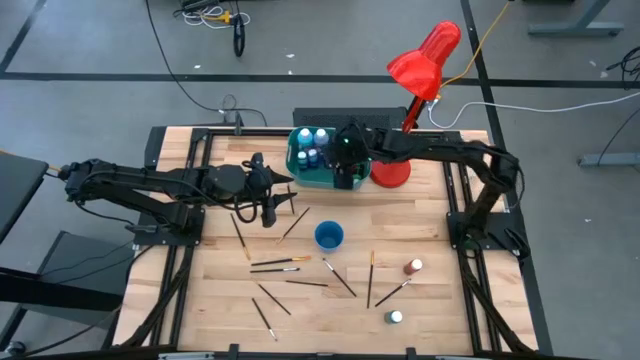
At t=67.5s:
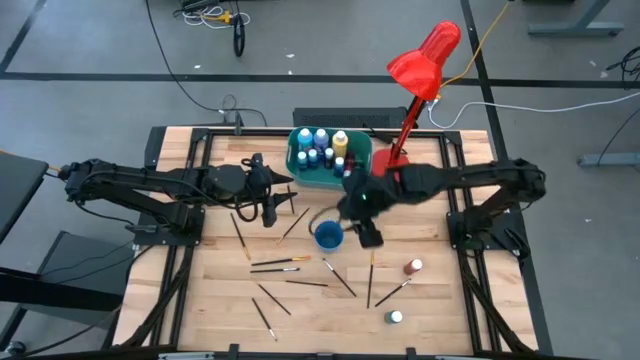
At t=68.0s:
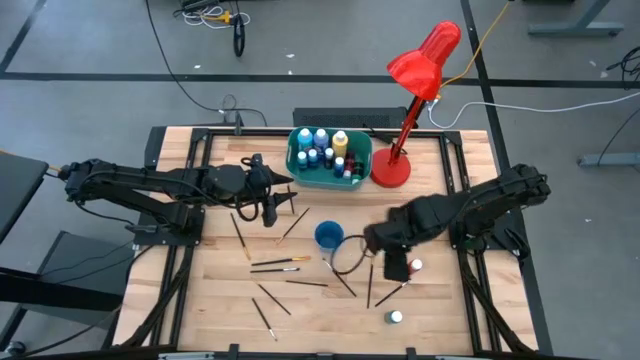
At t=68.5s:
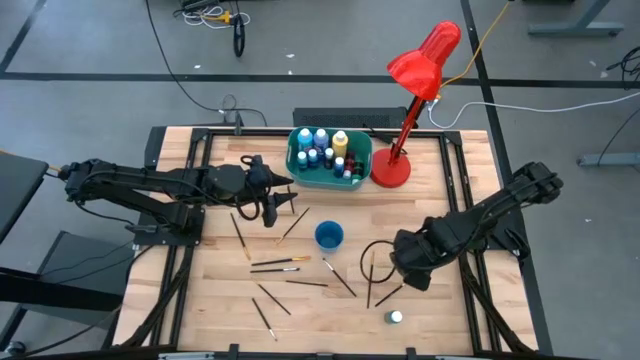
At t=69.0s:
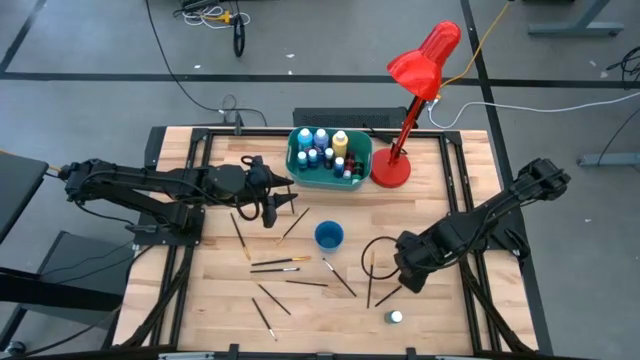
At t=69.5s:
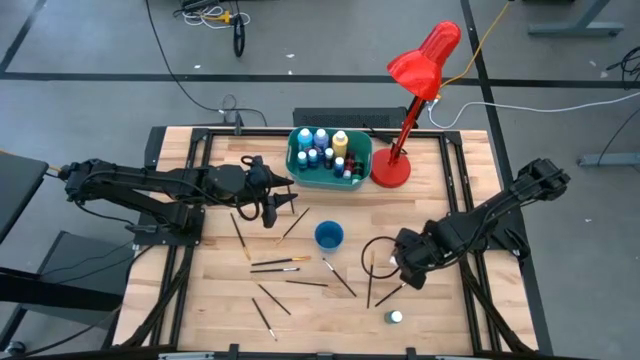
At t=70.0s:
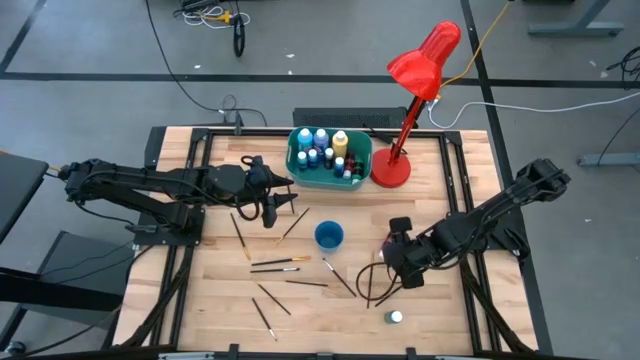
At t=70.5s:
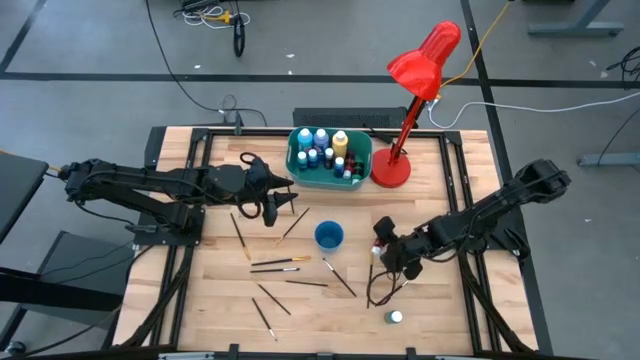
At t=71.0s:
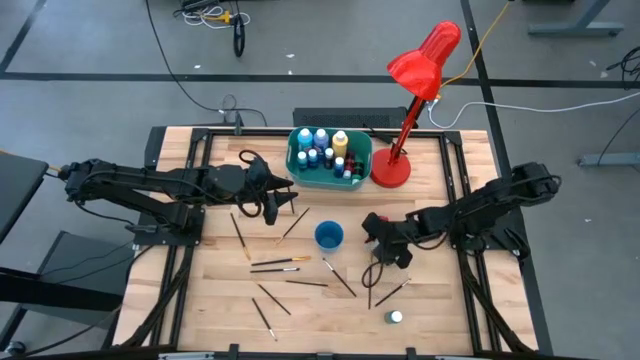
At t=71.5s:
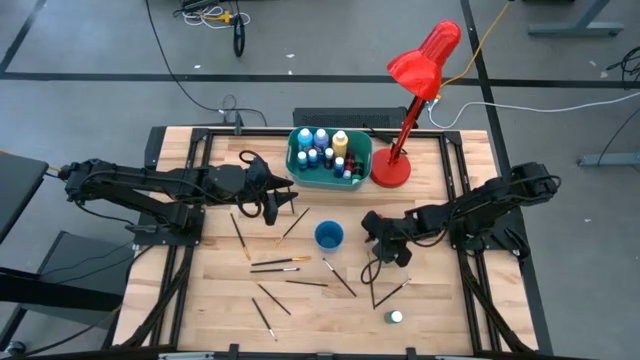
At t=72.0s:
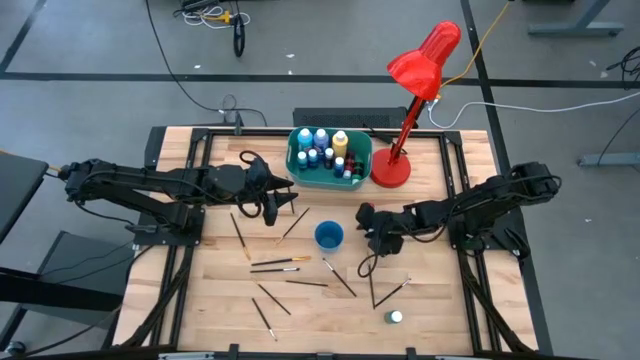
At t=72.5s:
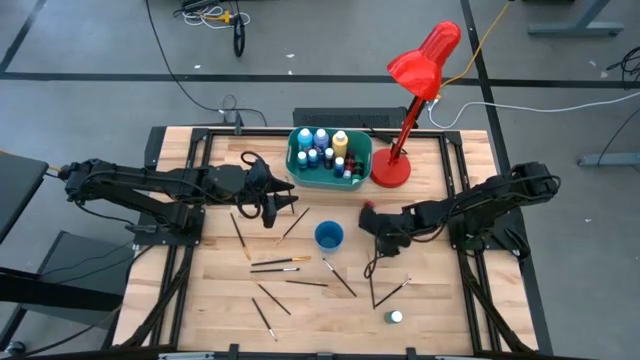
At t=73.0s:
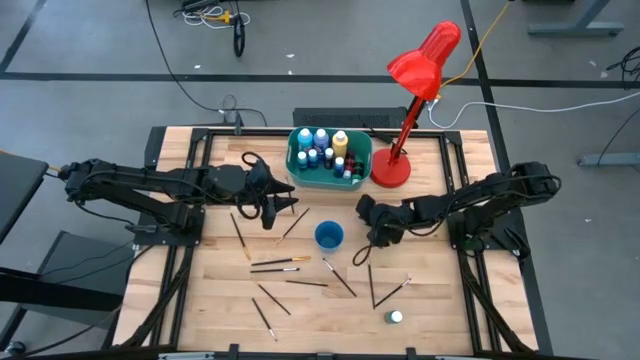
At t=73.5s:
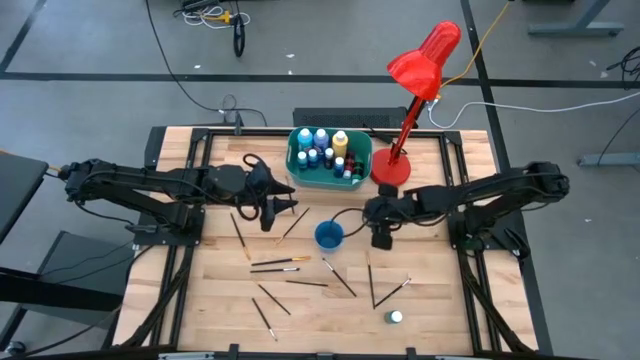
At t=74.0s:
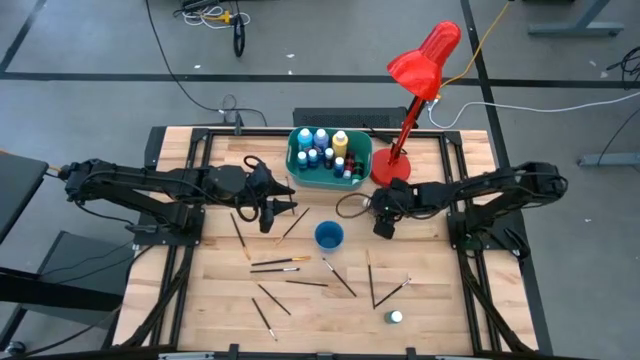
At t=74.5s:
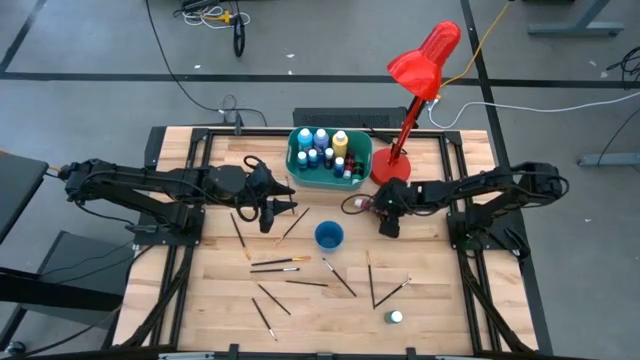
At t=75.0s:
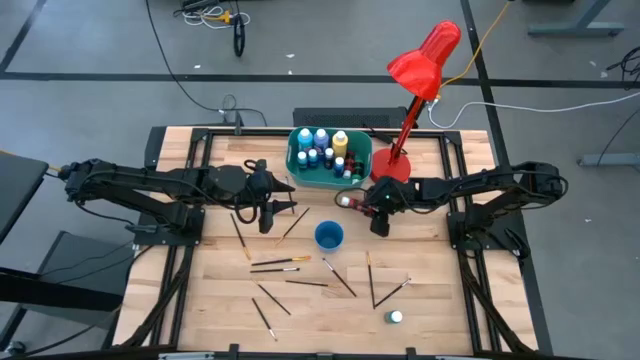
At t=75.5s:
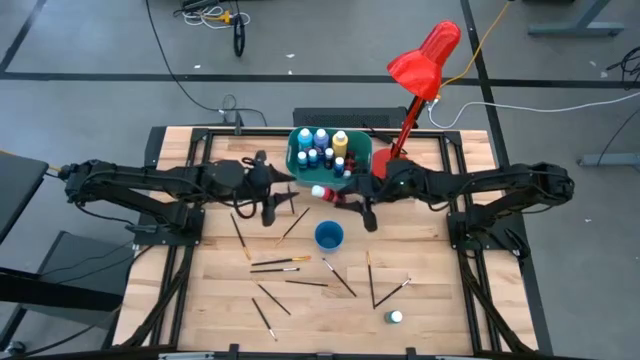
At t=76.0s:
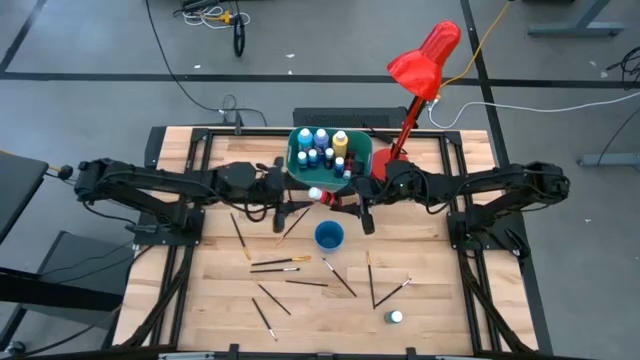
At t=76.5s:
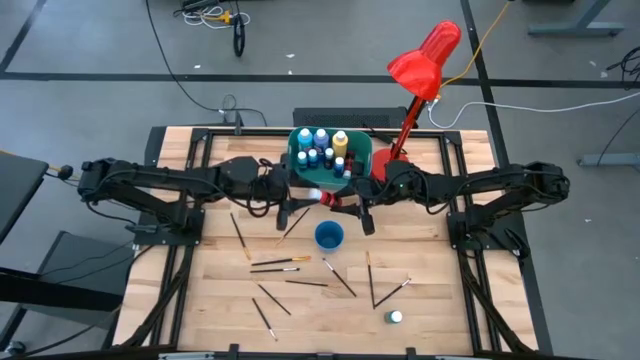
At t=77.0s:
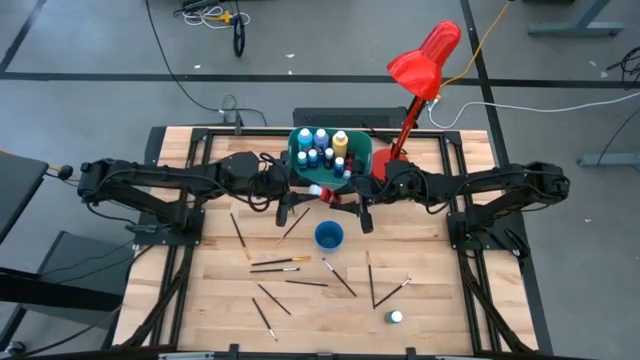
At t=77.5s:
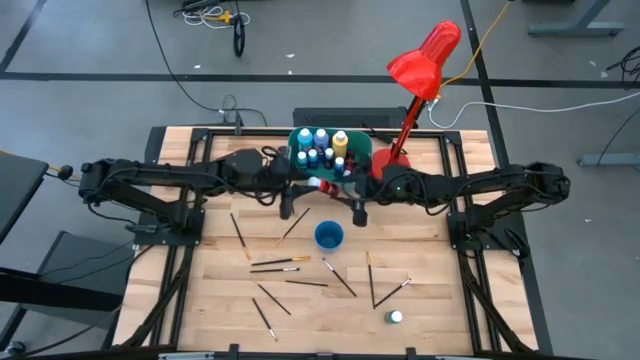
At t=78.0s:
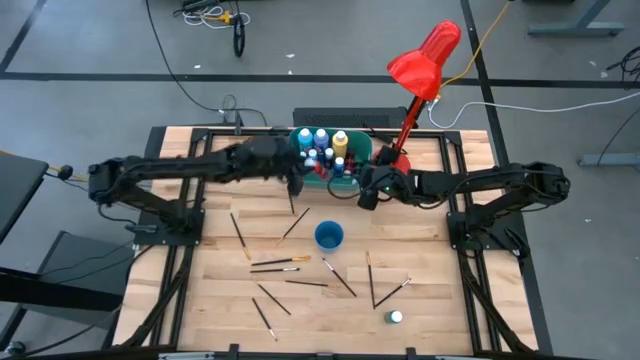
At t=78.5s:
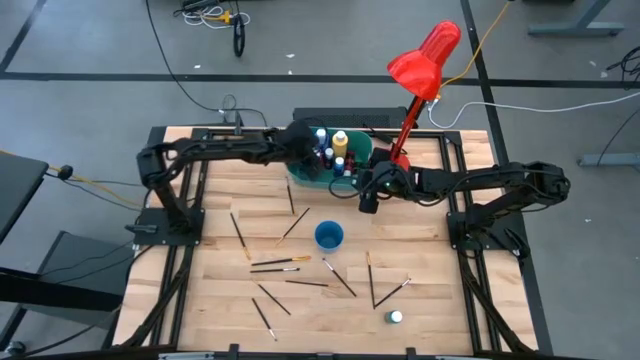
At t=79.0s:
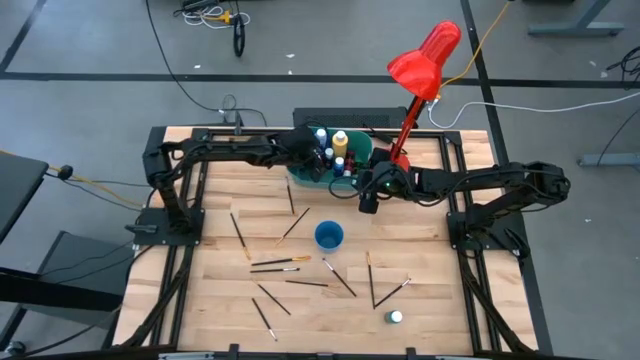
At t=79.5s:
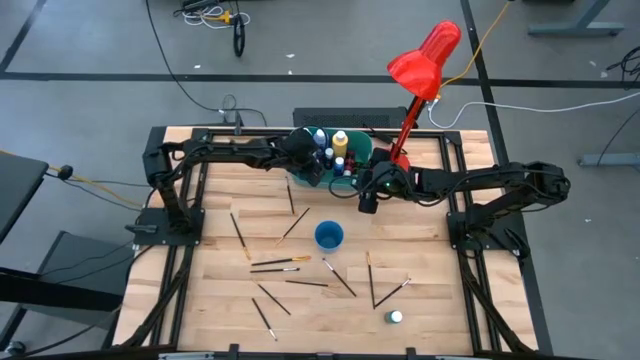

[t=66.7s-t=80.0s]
Task: Pick & Place Paint Supplies
Put the red paint bottle into the green bin

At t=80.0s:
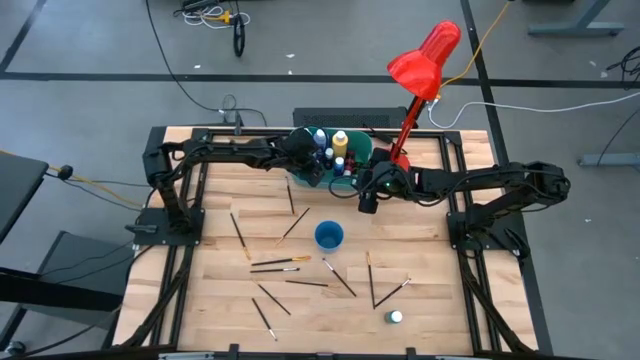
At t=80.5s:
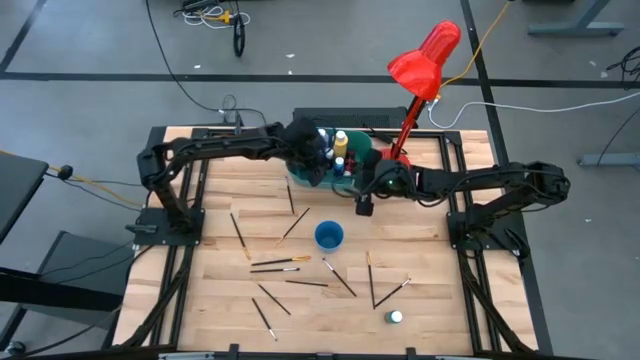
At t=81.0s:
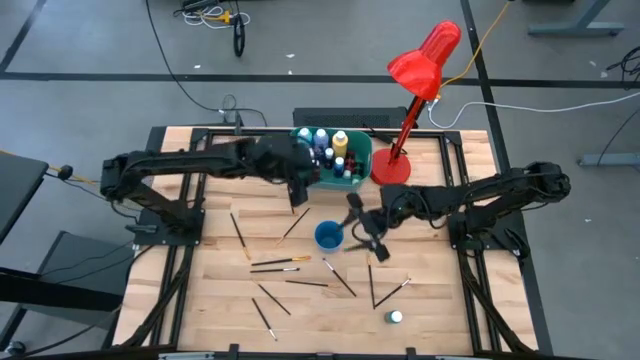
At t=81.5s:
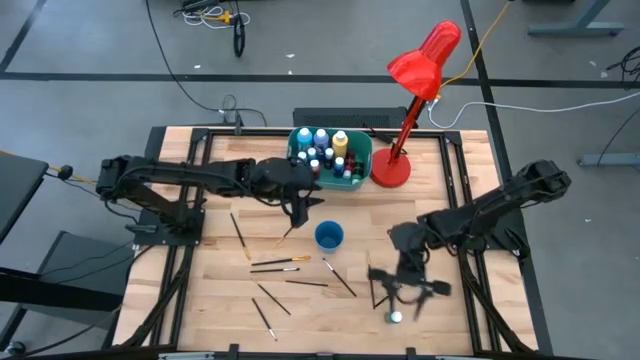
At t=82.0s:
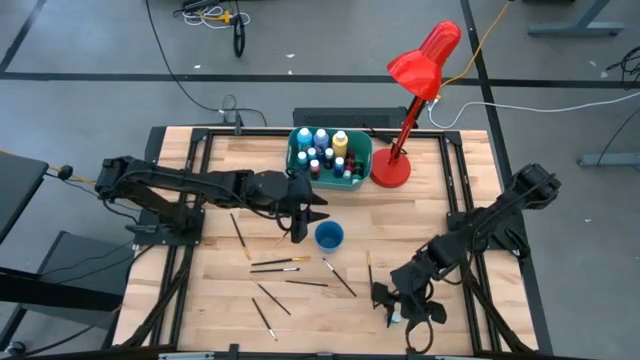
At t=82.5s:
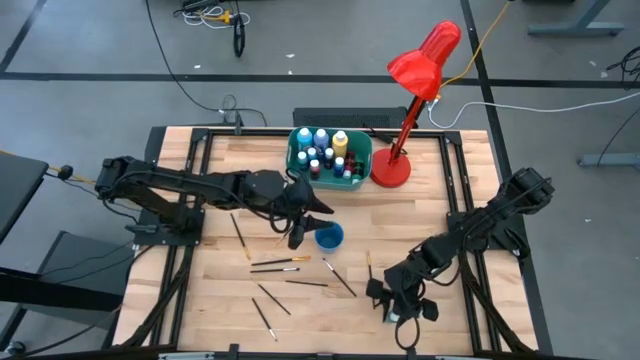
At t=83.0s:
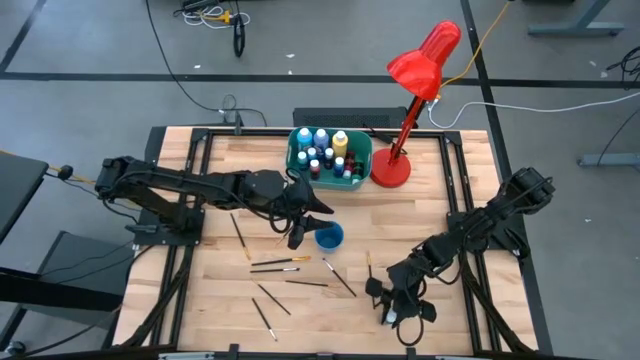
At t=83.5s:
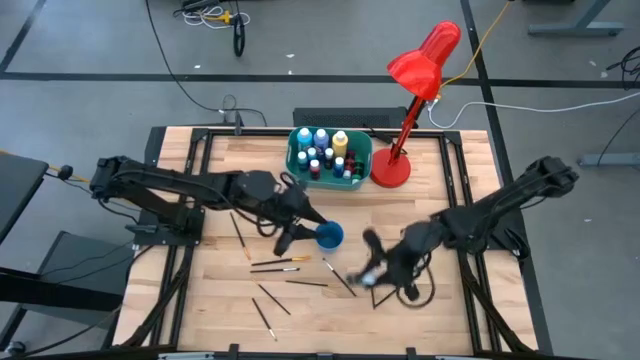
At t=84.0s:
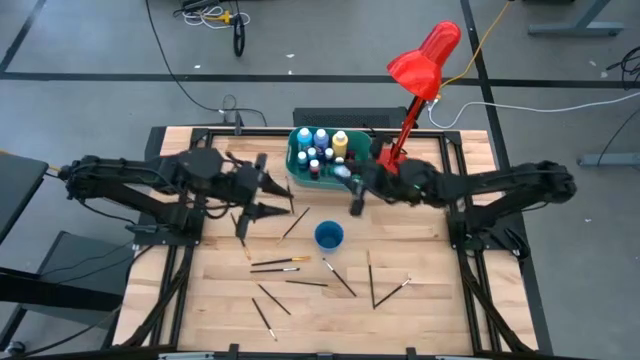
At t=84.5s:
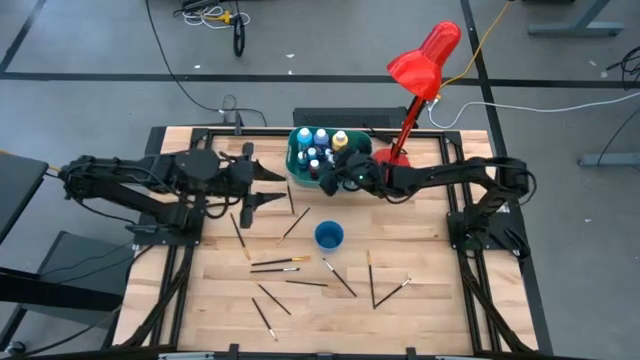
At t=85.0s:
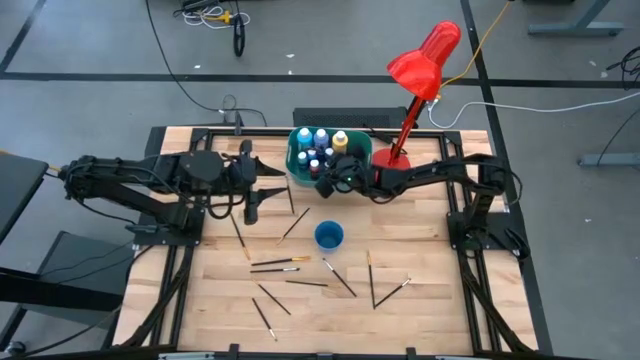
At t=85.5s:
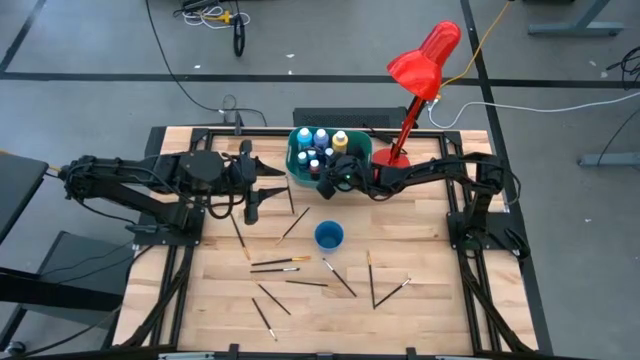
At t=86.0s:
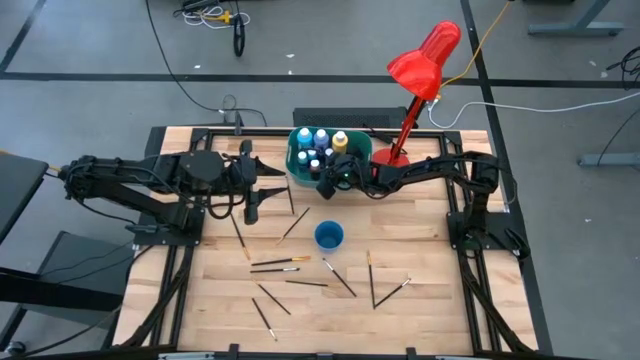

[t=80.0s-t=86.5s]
Put the light green paint bottle into the green bin
